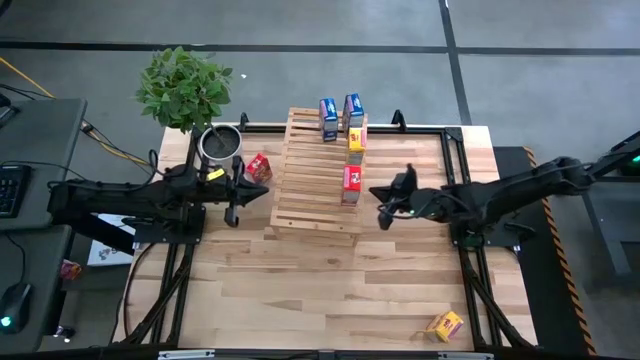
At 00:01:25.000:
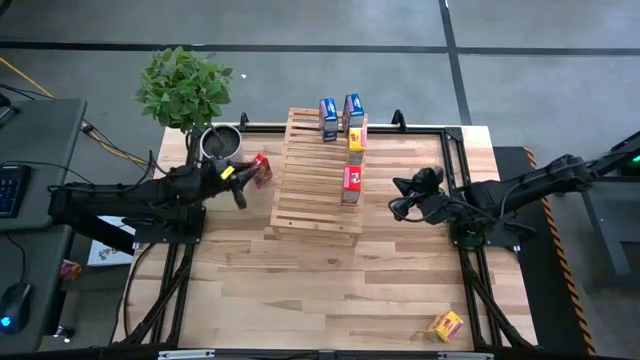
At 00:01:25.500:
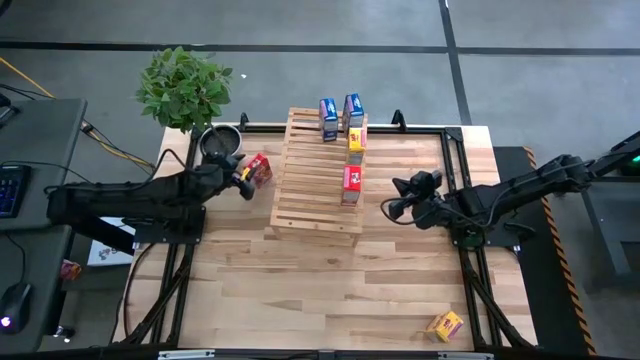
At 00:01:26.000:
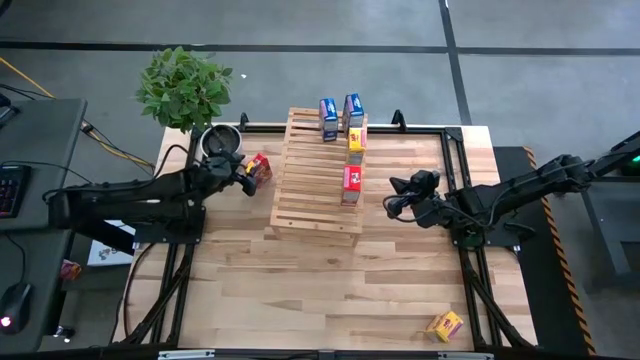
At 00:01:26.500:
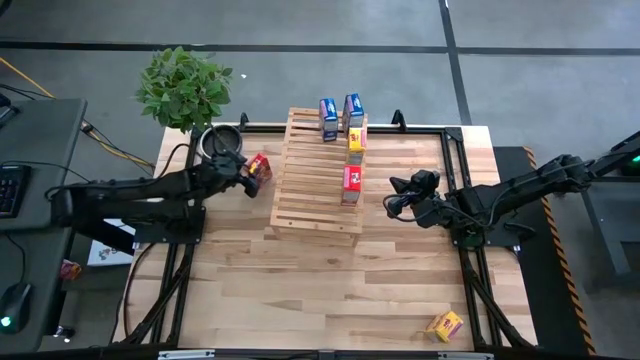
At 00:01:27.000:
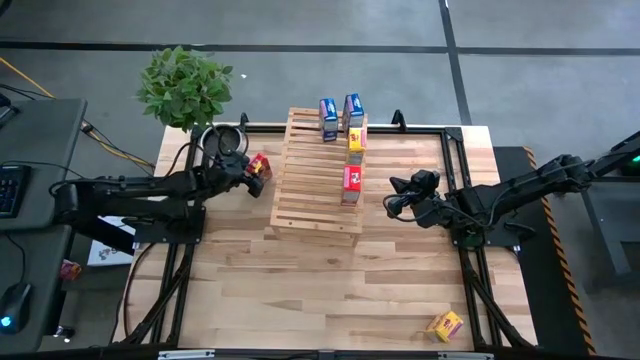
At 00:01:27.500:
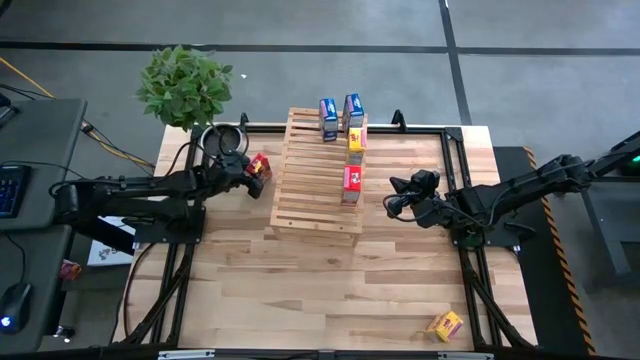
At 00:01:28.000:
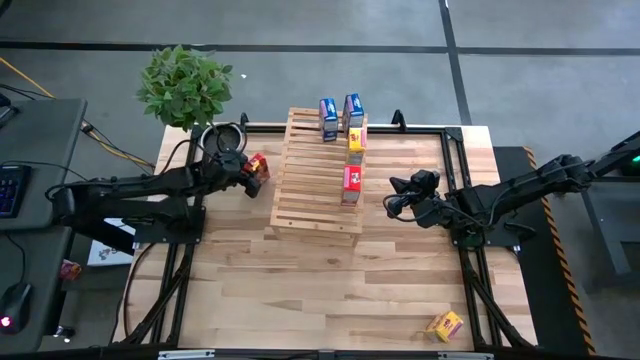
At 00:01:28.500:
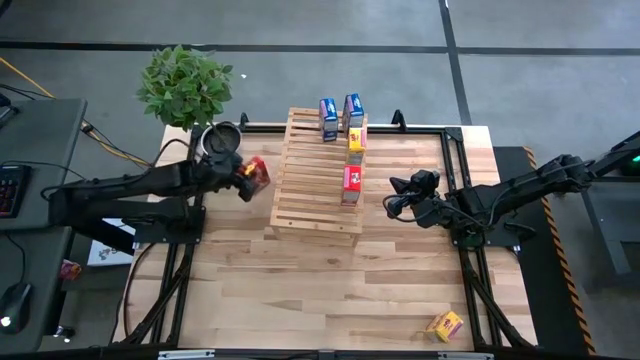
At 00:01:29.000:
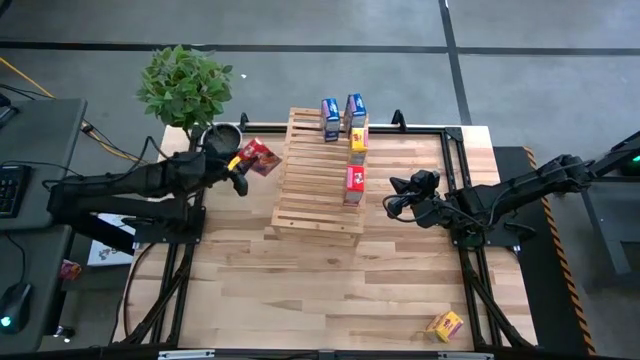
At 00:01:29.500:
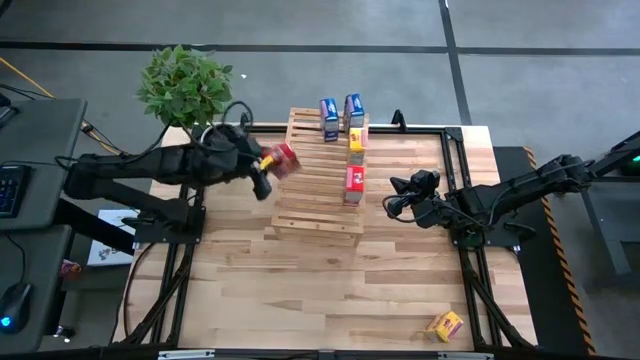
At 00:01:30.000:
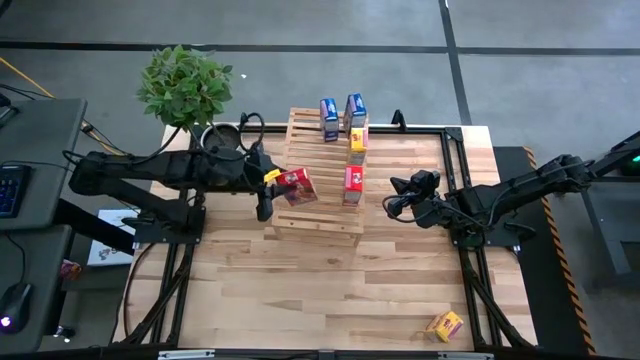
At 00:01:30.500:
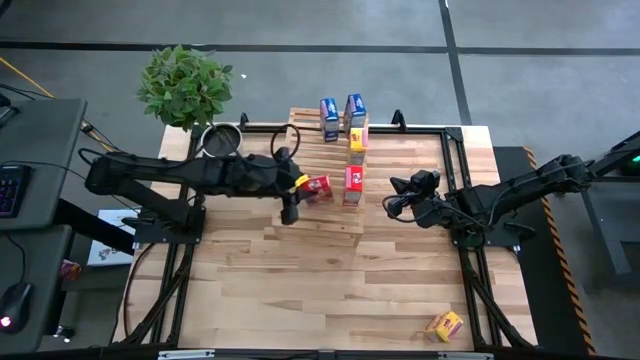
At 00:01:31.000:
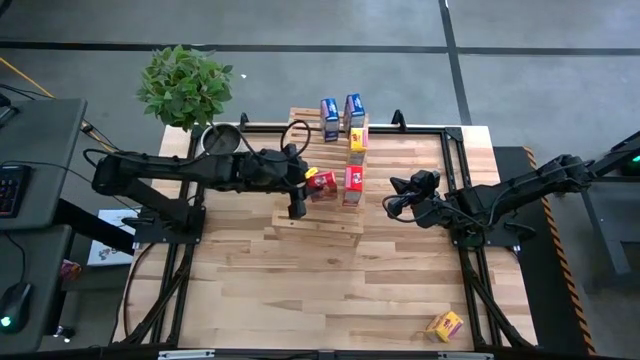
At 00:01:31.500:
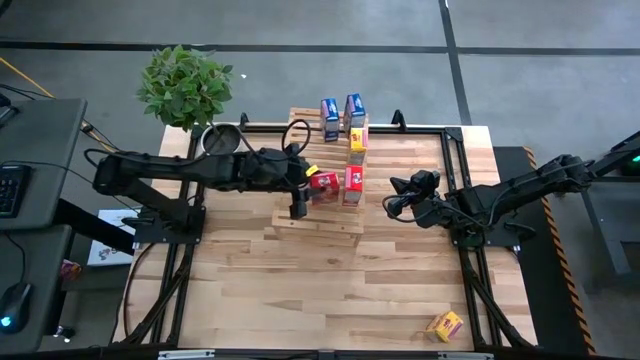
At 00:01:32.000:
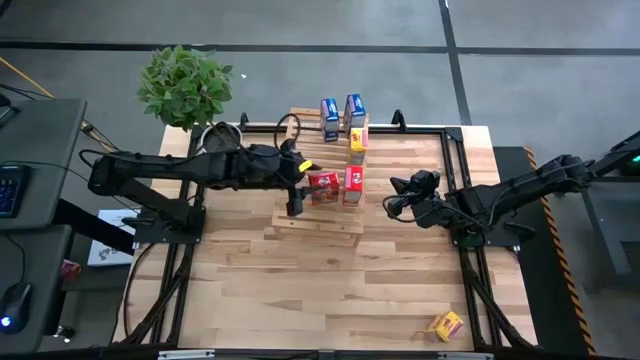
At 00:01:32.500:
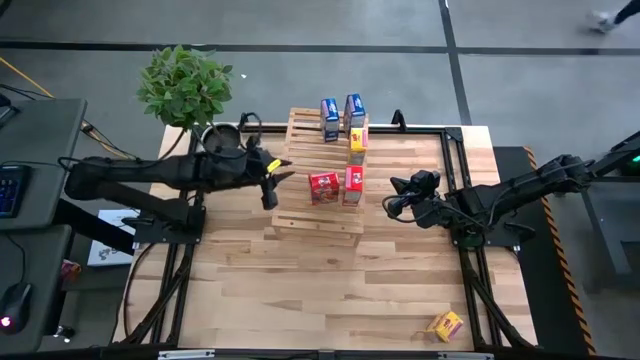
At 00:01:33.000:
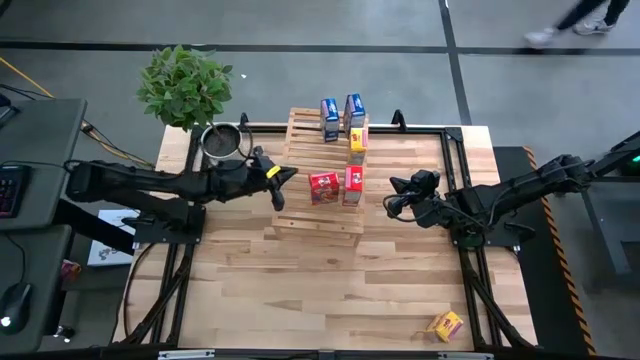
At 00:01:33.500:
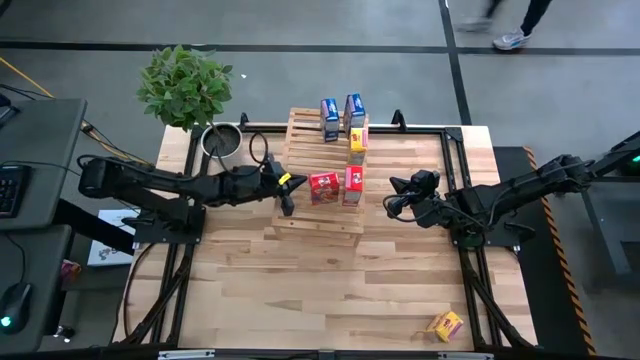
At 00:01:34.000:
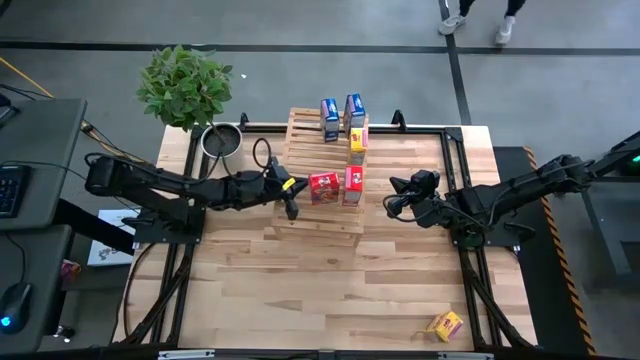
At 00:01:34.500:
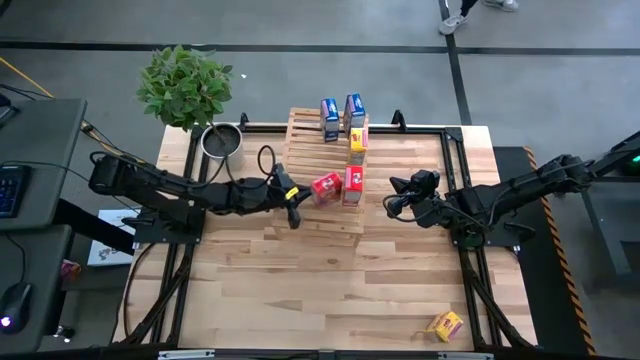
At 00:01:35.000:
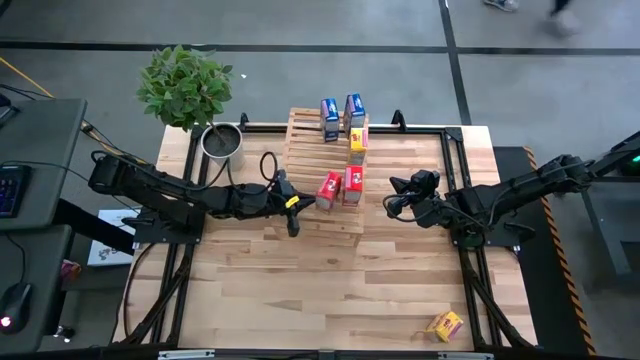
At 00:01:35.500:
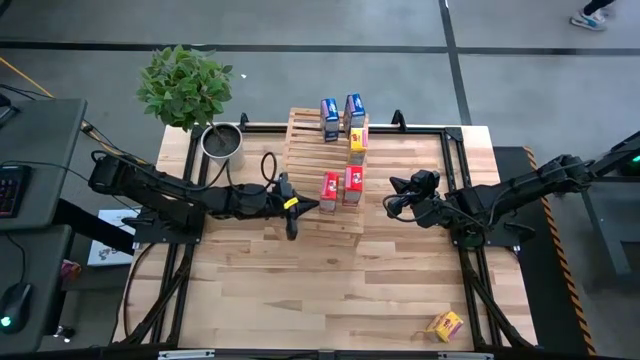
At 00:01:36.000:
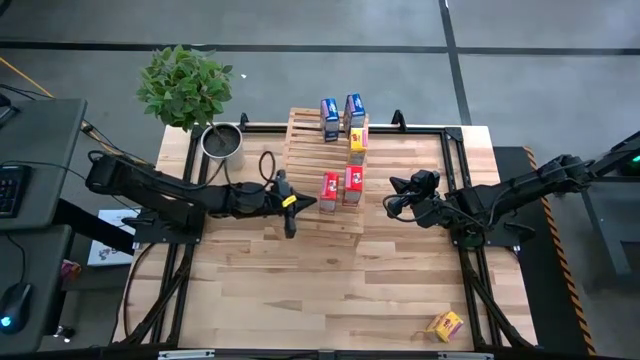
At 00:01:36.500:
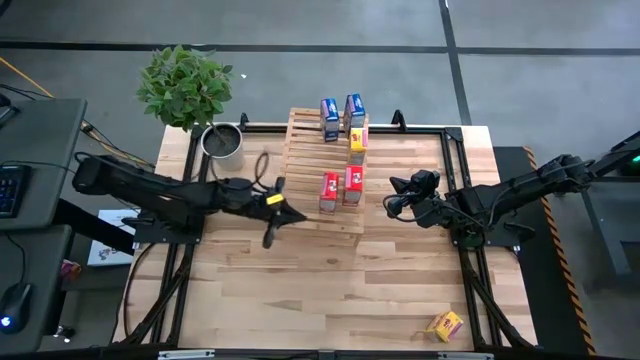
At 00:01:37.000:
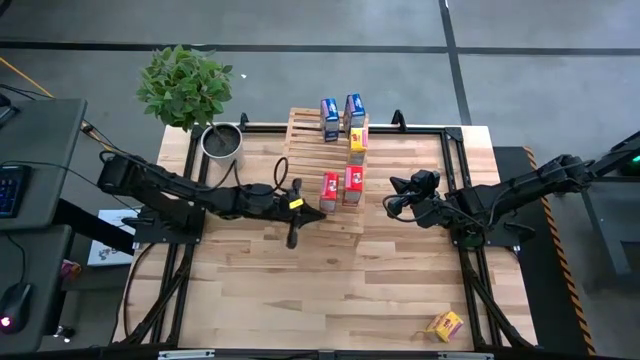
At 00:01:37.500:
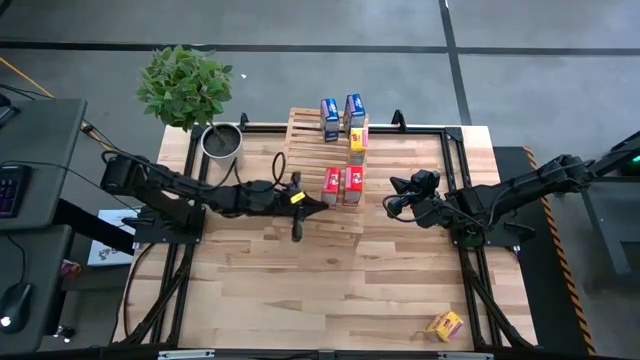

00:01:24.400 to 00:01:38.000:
Task: Stack cereal on shelf
Put the red cereal box on the shelf aligned with the other red cereal box

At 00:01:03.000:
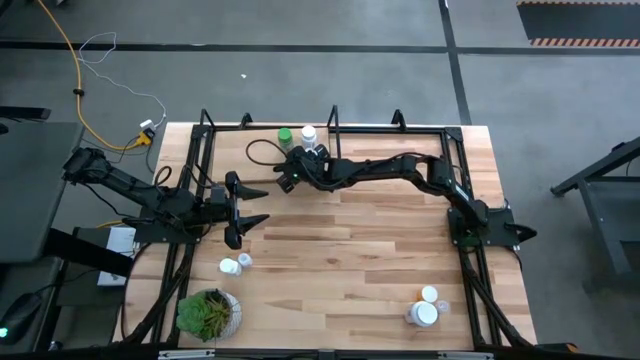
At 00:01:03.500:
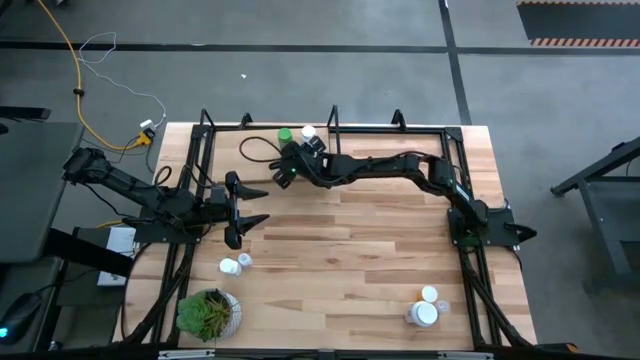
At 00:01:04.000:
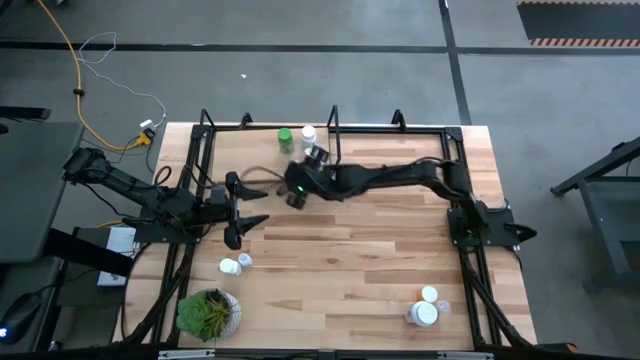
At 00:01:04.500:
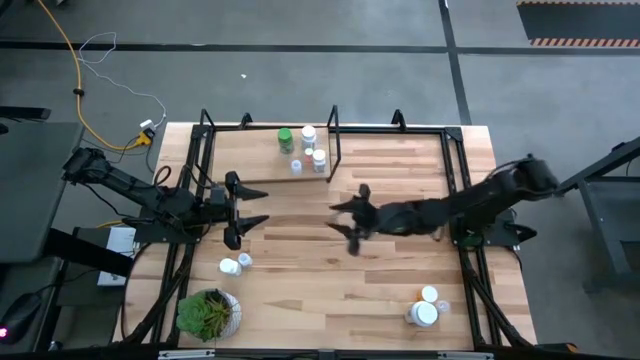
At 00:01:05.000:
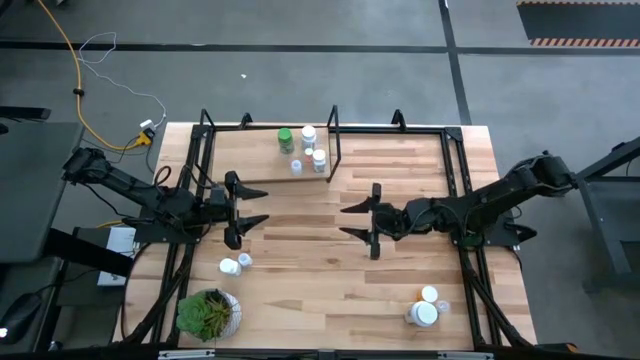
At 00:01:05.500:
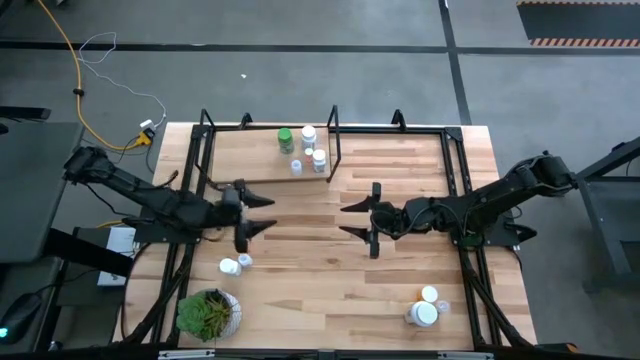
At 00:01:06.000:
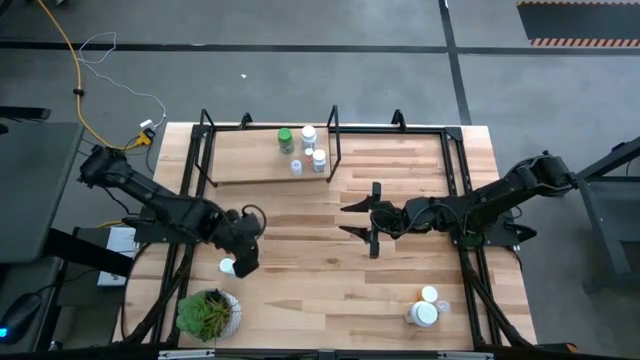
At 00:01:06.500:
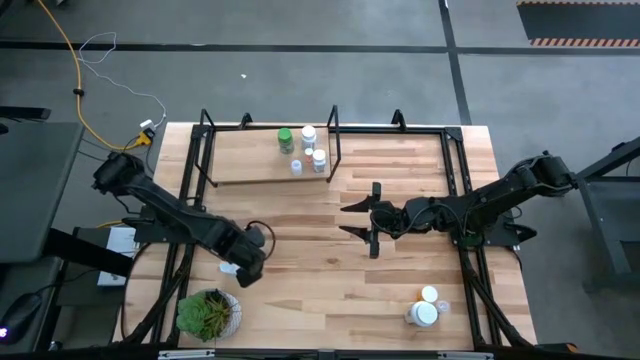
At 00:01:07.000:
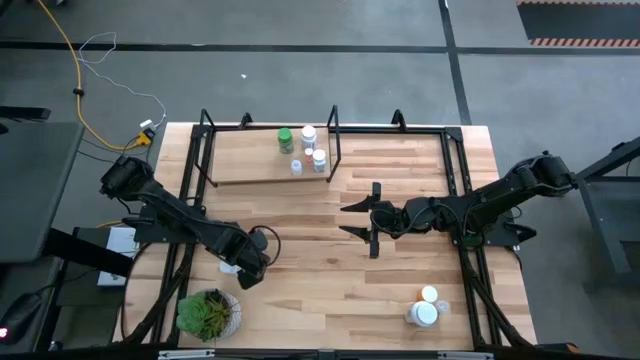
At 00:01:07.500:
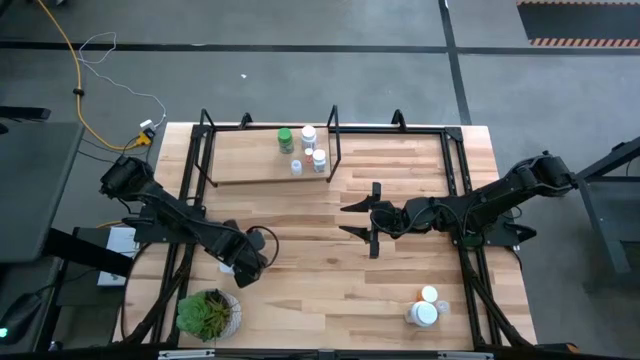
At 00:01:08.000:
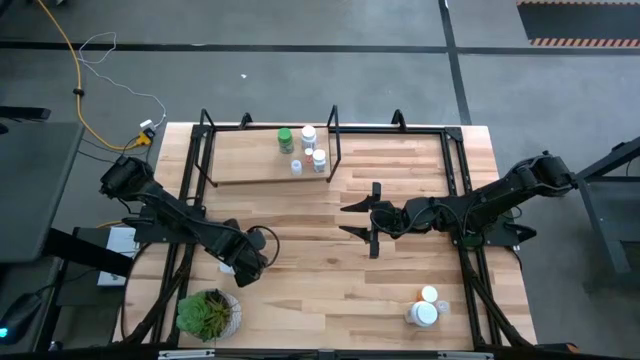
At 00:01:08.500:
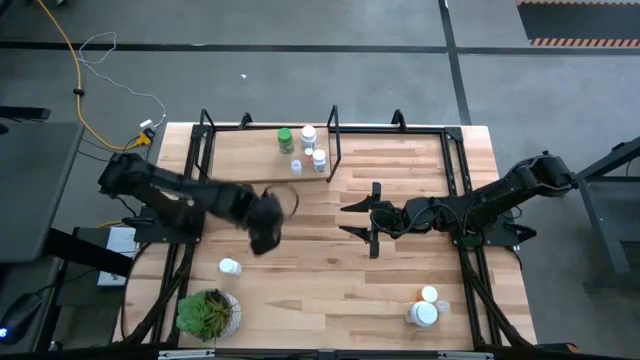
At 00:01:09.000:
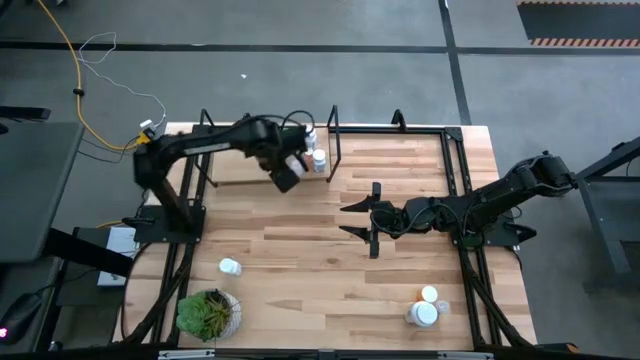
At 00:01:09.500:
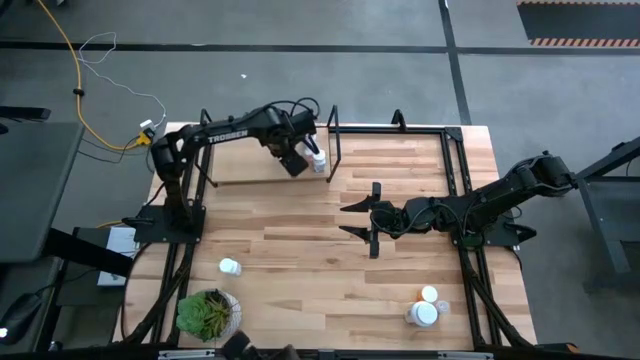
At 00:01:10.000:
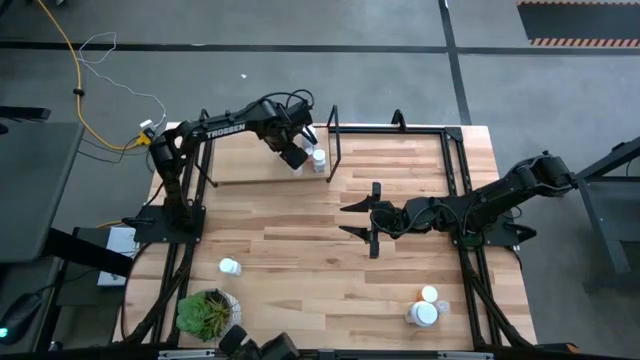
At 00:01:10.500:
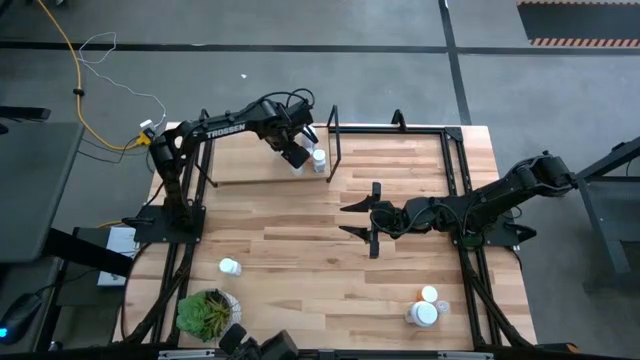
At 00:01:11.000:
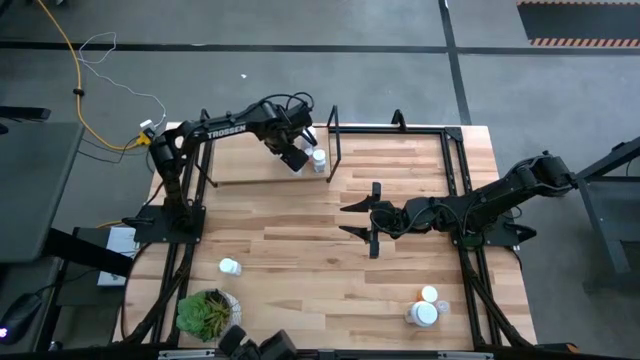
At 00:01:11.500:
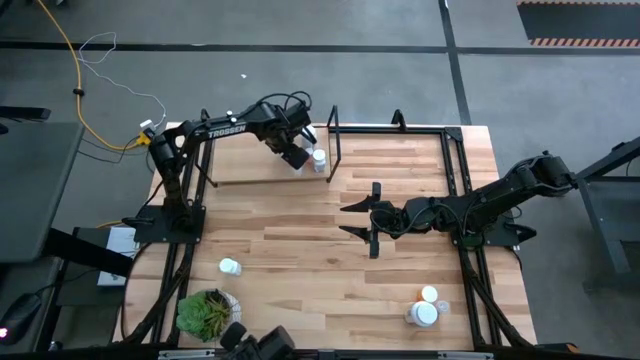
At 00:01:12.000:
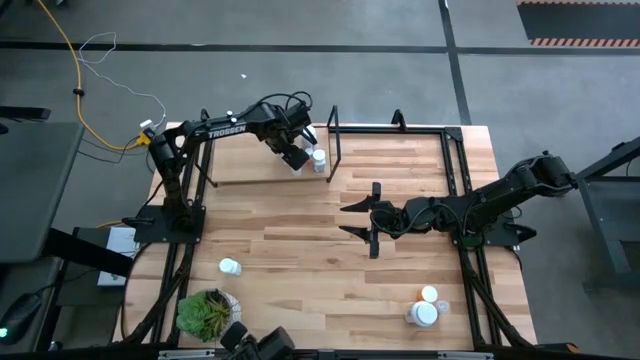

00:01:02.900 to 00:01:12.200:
Task: Pick and place medicine bottles onto shelf by color
Put the small blue pill bottle on the shelf
